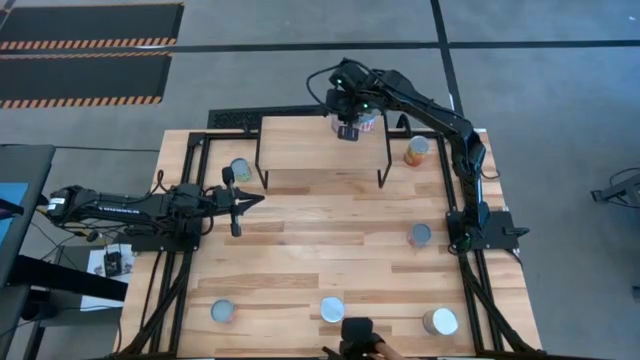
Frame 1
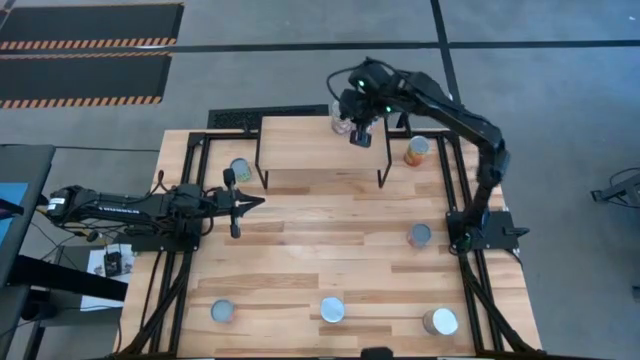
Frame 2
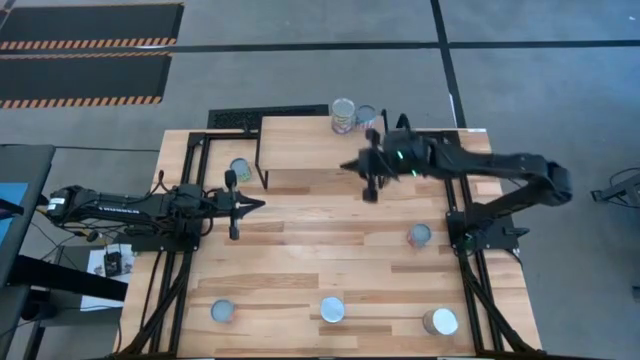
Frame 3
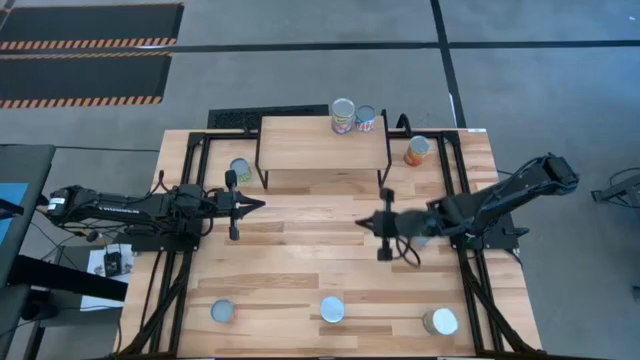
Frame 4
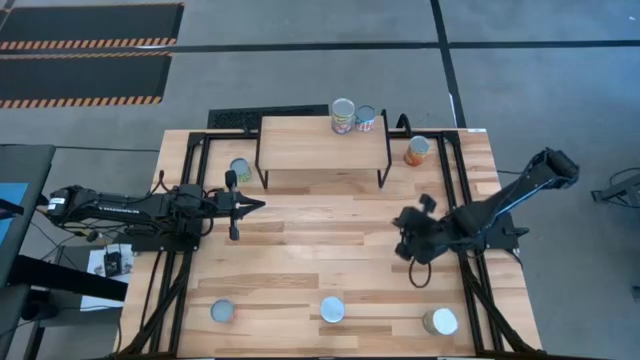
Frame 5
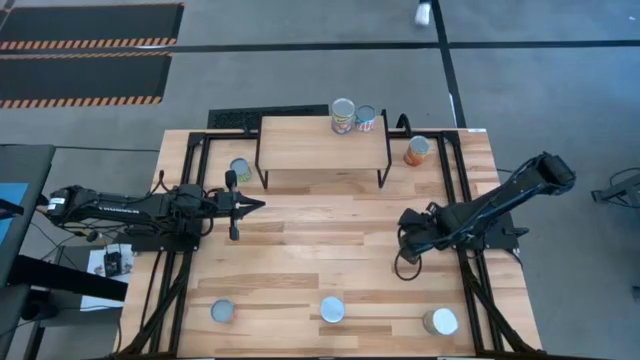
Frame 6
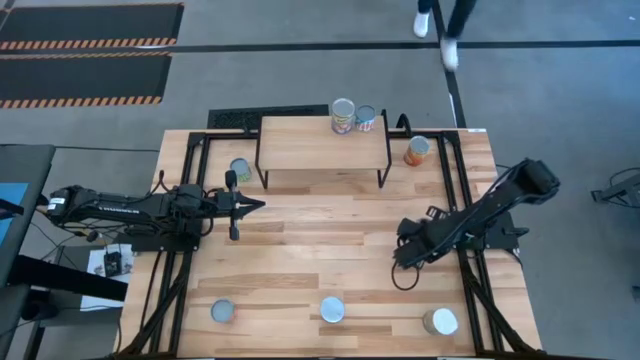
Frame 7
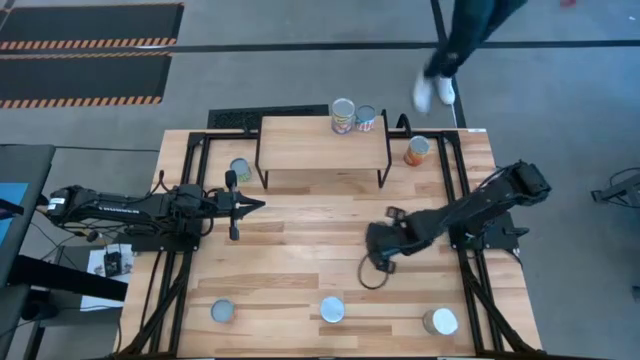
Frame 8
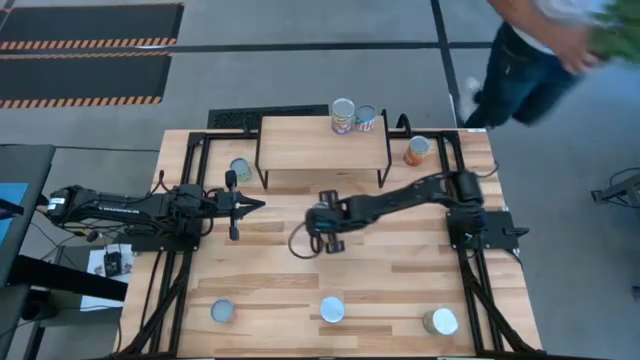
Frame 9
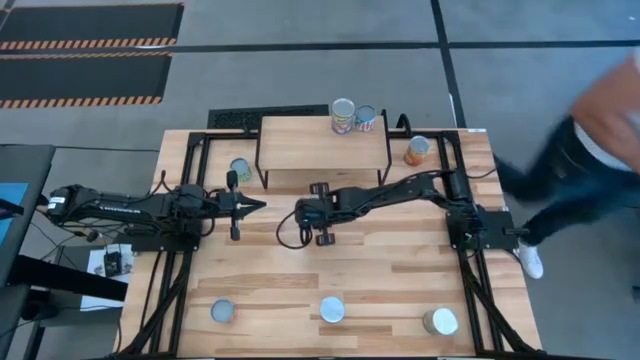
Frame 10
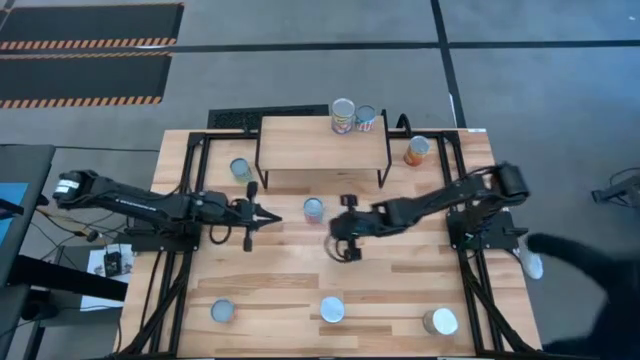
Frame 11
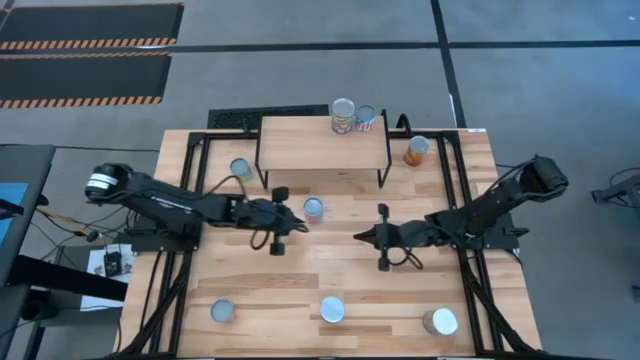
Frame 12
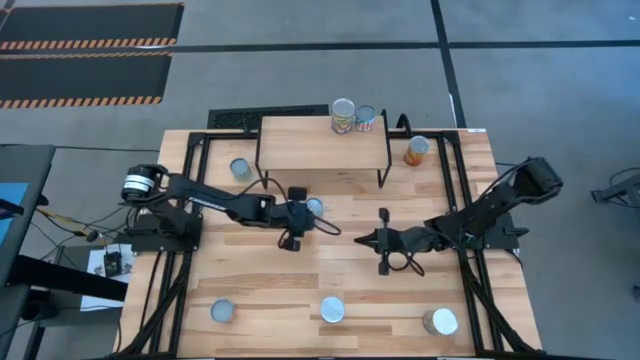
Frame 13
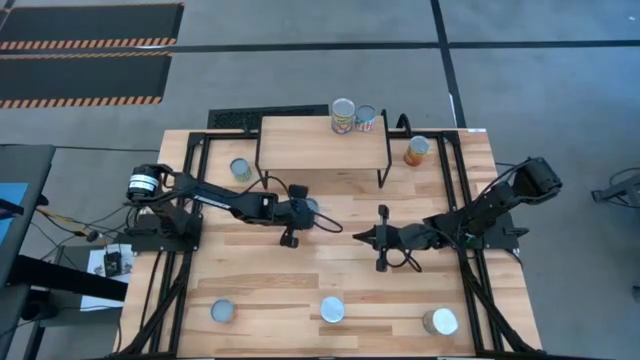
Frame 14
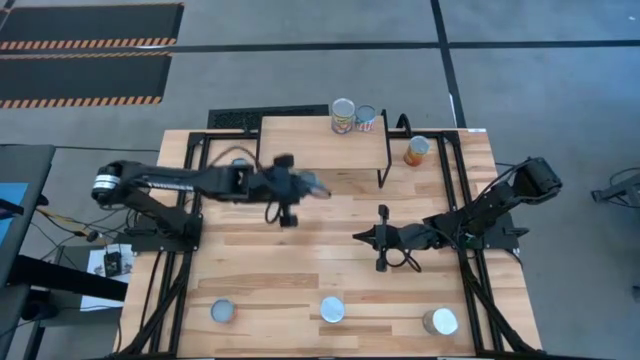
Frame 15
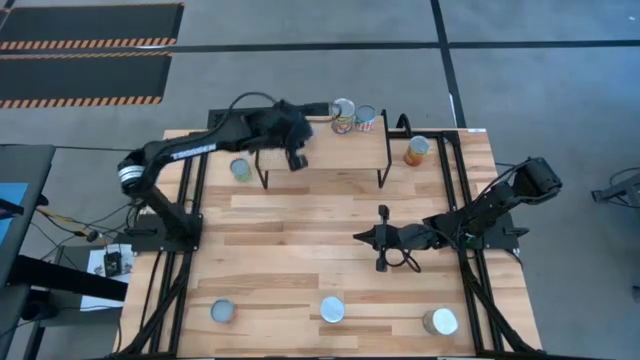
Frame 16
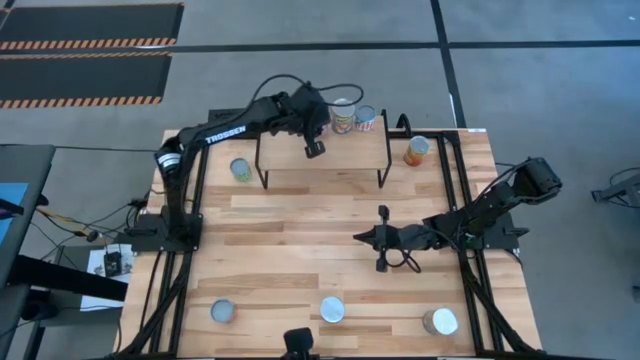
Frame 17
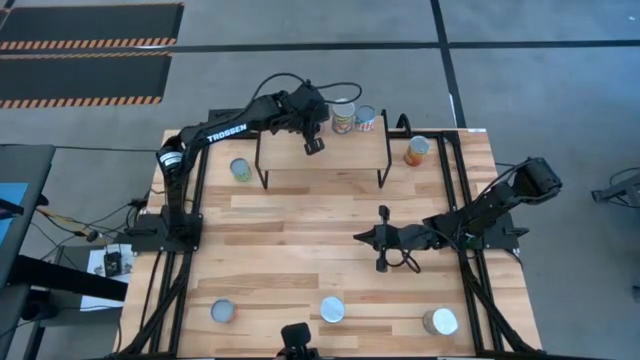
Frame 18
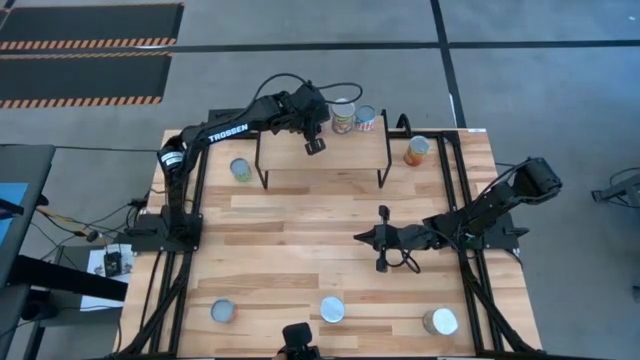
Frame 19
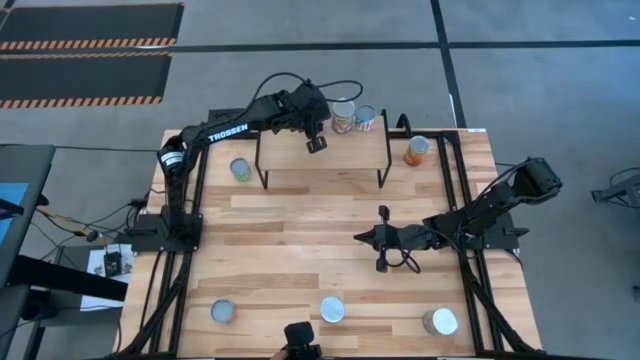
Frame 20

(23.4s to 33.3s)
Task: Pick and place cans onto a shelf
Put the small canned corn on the shelf

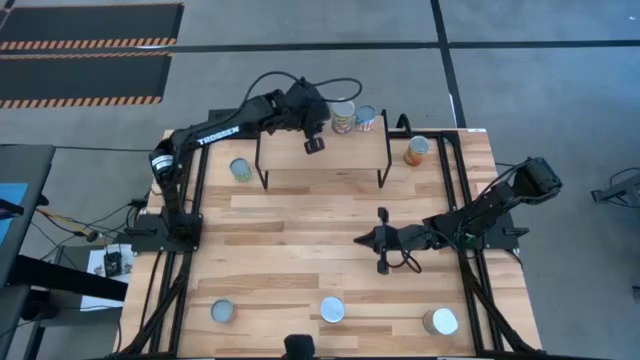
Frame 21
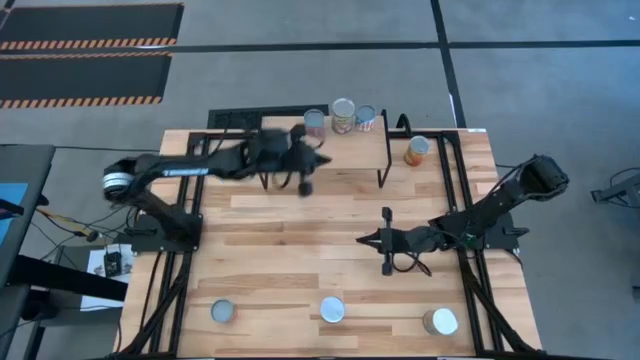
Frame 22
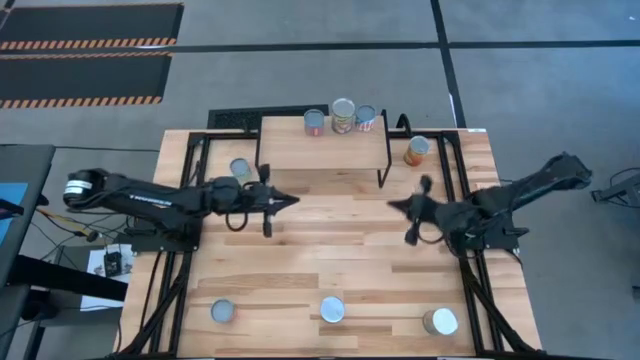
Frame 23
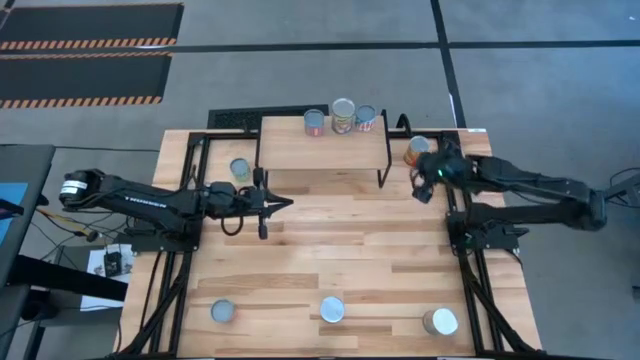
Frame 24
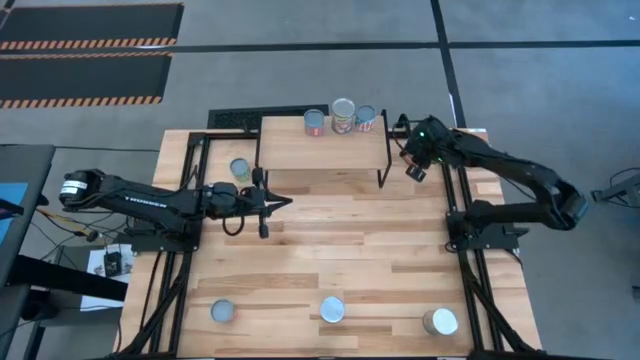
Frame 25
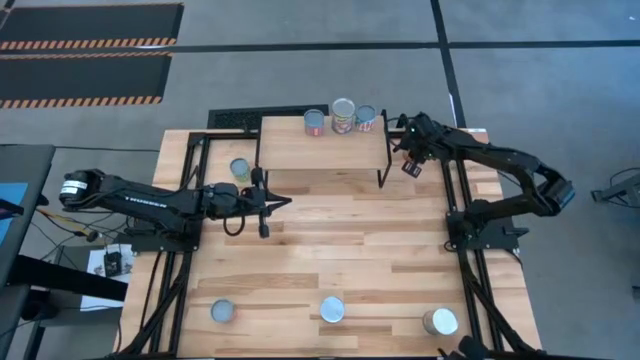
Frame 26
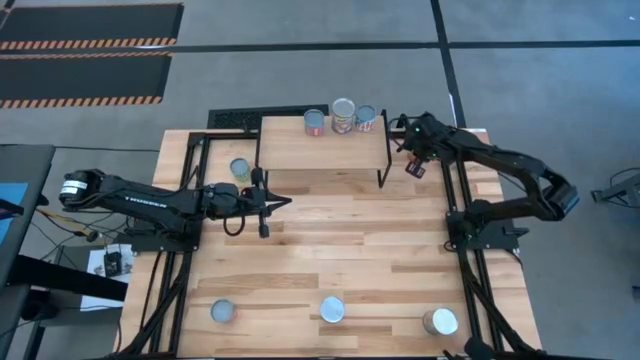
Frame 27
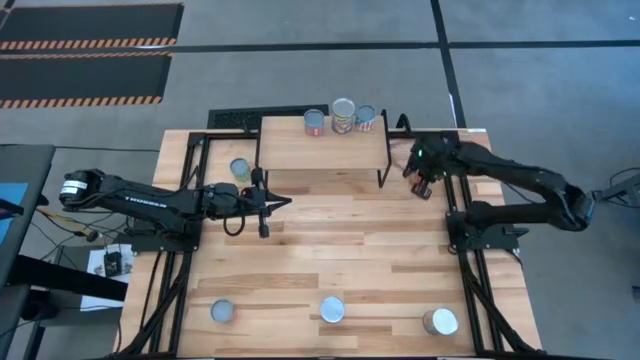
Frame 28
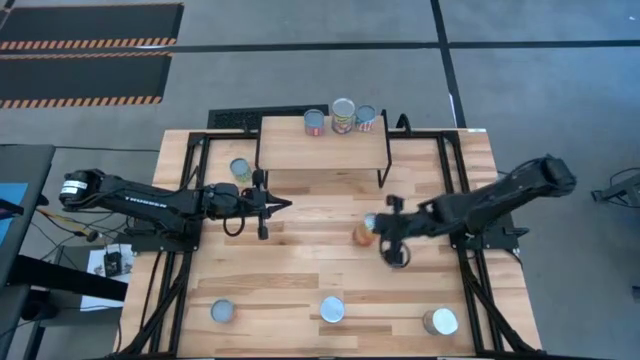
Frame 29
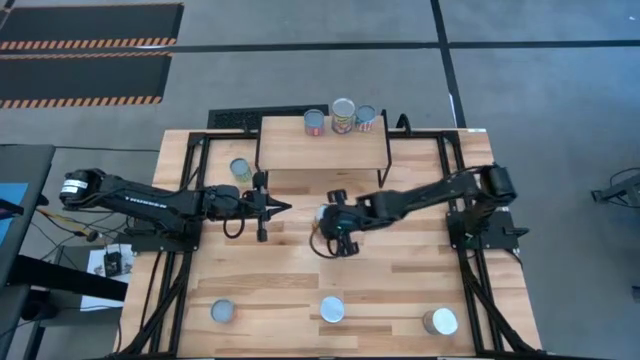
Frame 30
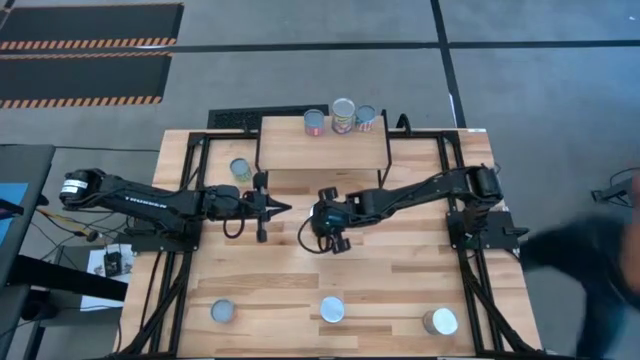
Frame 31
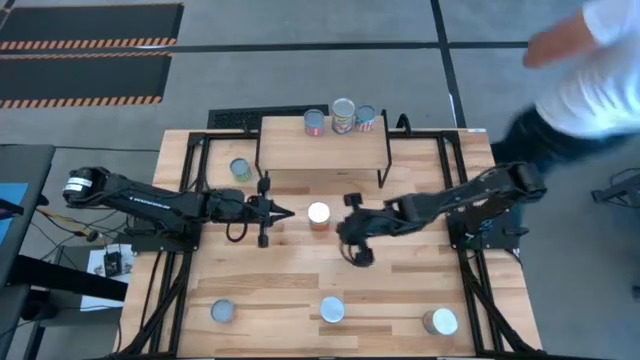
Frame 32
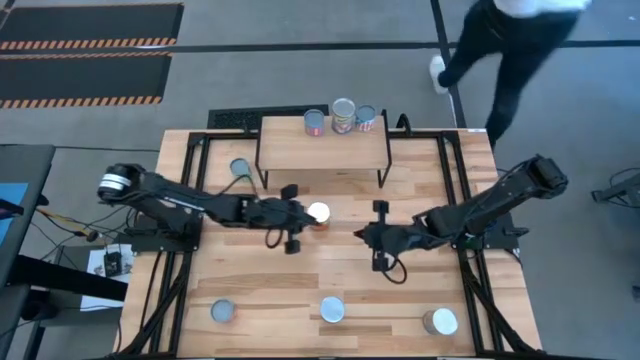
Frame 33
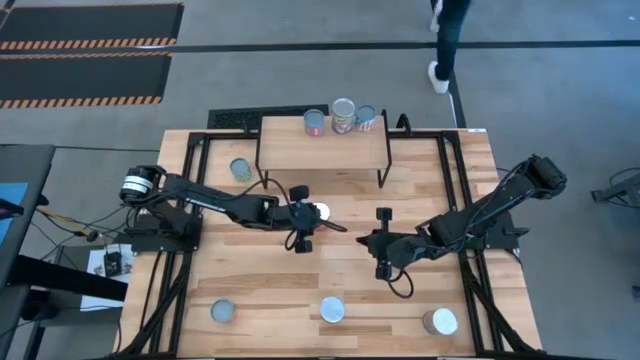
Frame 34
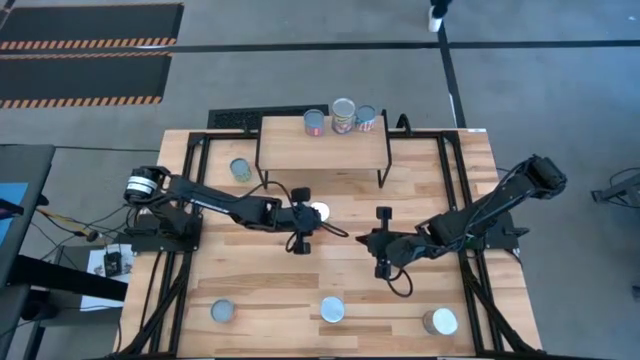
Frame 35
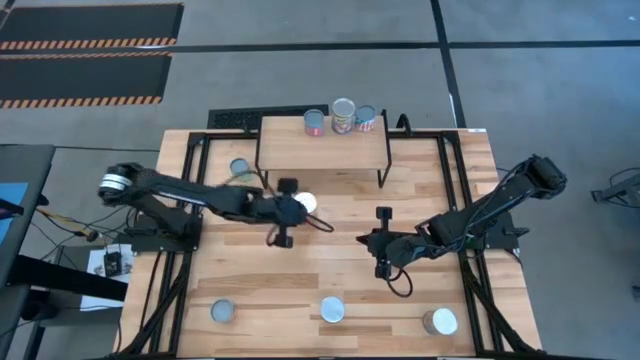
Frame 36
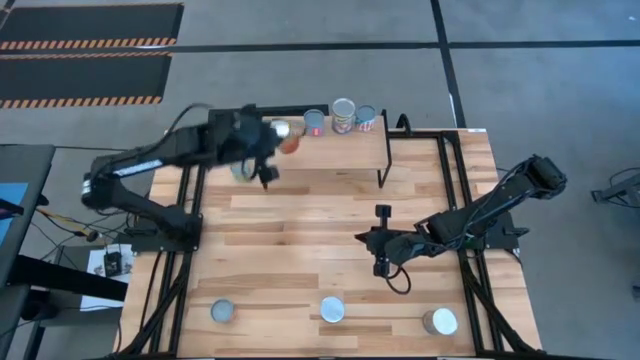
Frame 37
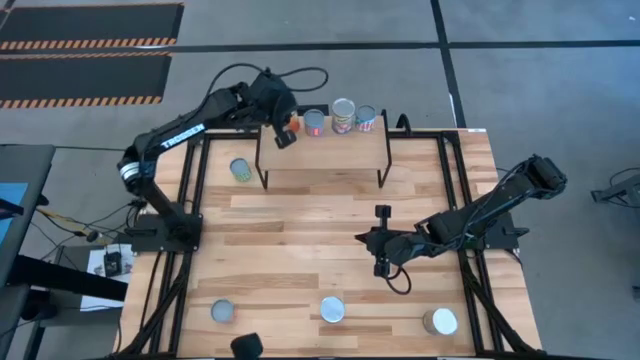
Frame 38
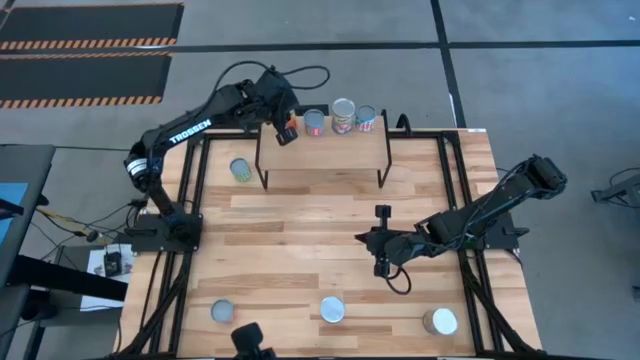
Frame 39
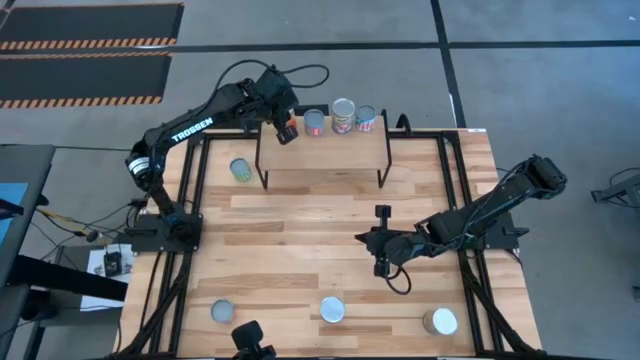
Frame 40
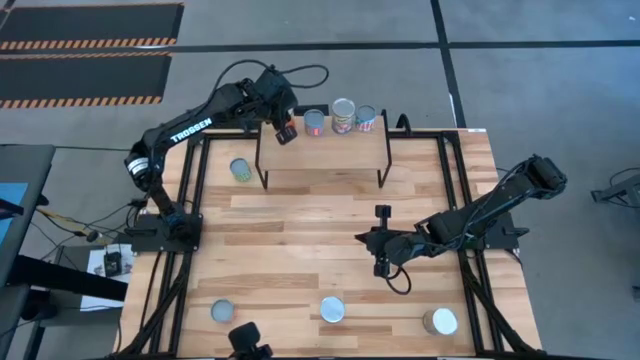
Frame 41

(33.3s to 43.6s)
Put the top big canned corn on the shelf

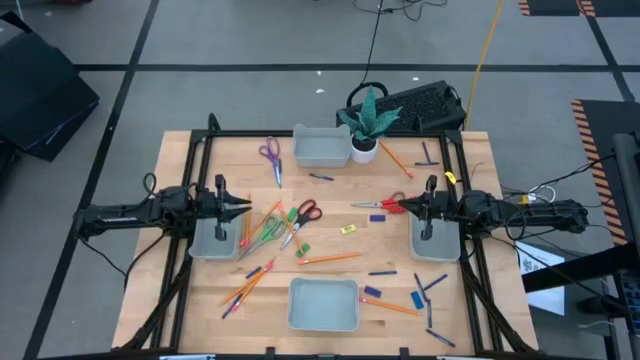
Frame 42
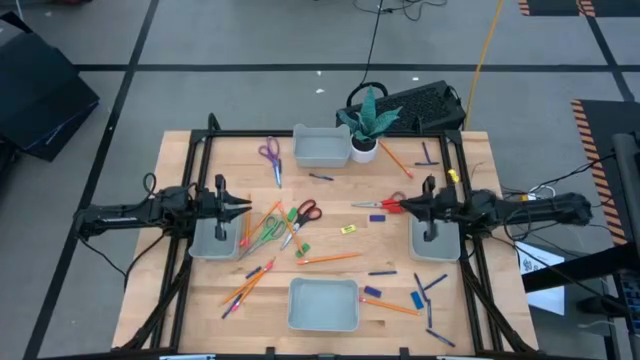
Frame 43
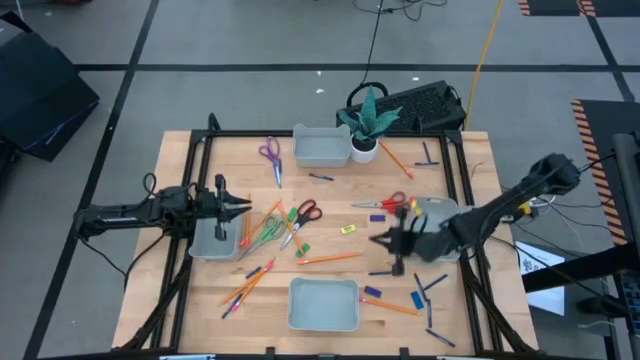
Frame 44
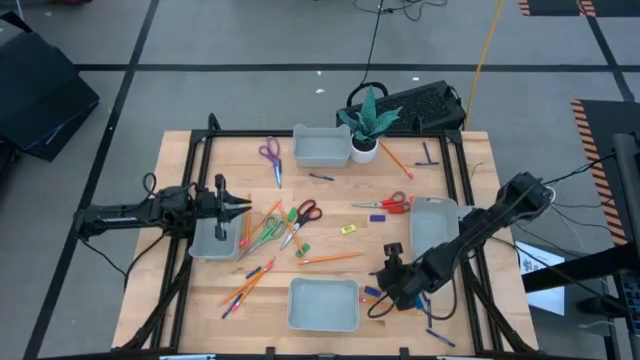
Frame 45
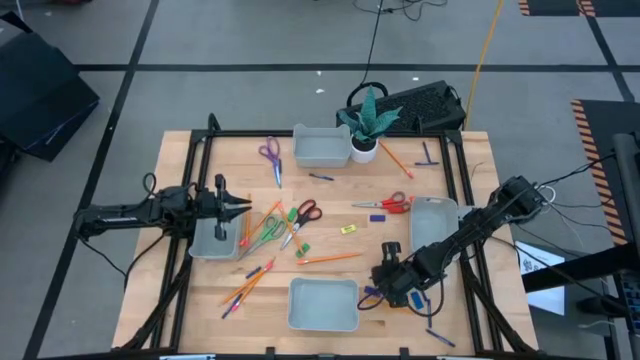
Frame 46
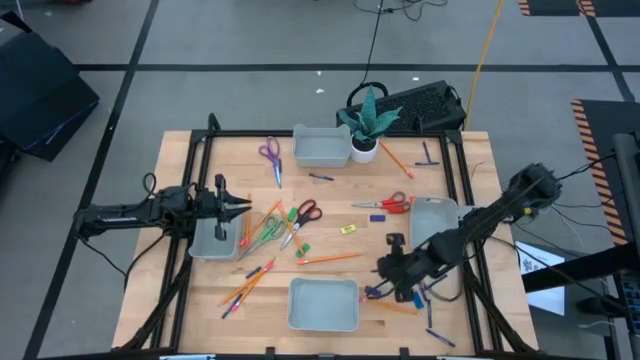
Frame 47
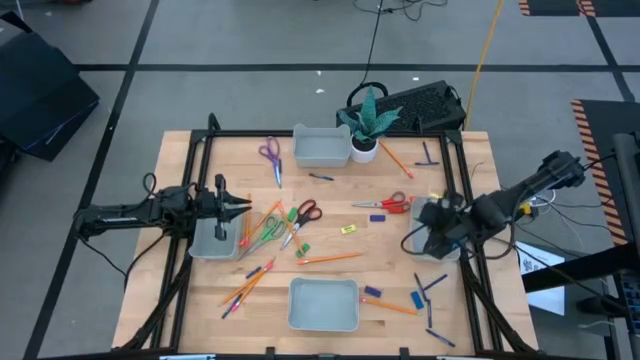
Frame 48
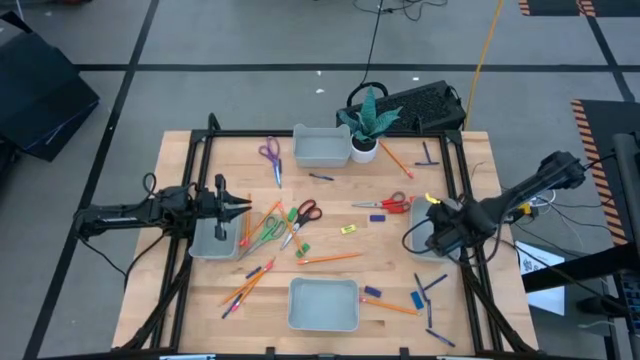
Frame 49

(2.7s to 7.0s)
Task: Sort crayons/erasers/pens/pencils in bins
Put the blue crayon into the middle right gray bin
